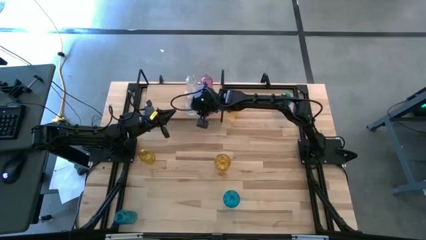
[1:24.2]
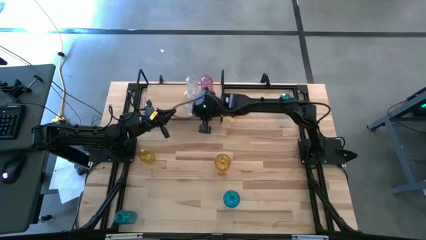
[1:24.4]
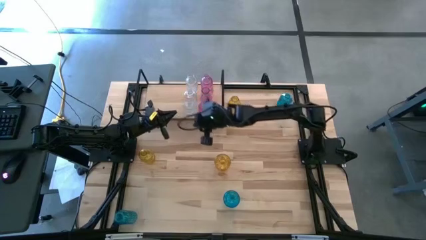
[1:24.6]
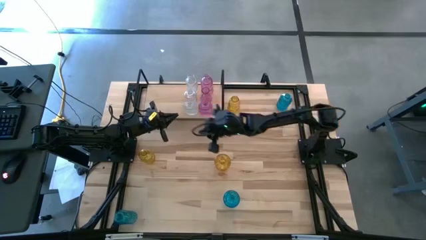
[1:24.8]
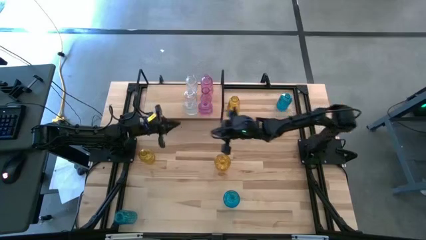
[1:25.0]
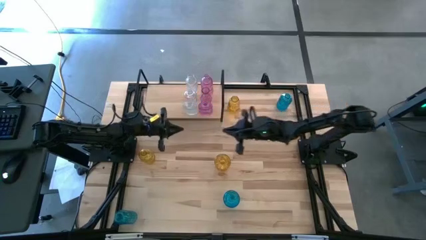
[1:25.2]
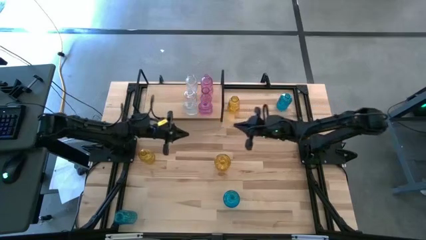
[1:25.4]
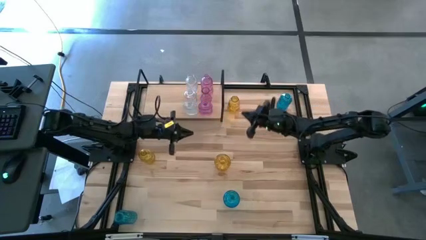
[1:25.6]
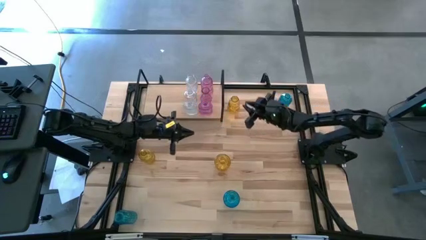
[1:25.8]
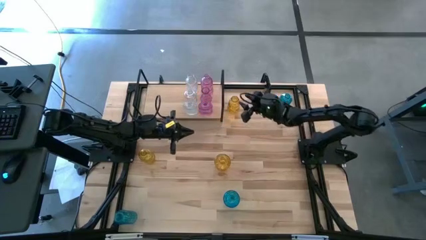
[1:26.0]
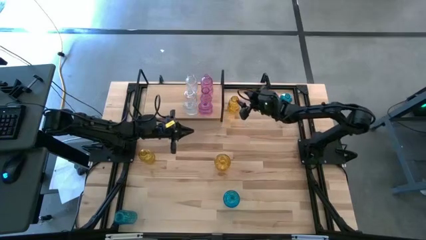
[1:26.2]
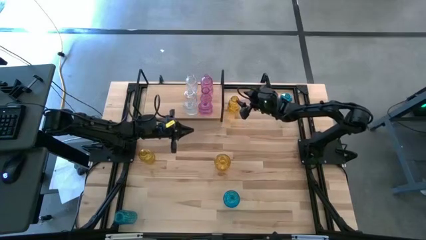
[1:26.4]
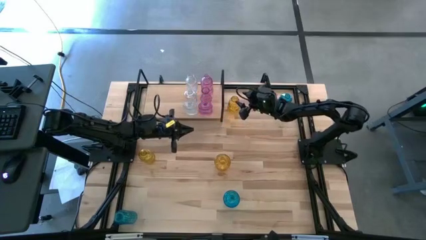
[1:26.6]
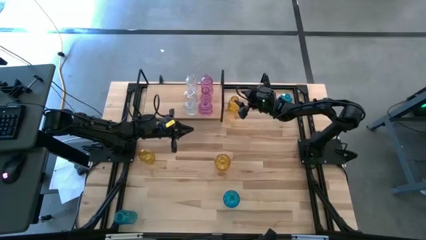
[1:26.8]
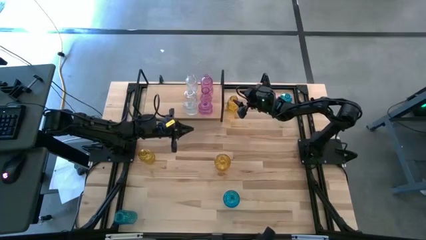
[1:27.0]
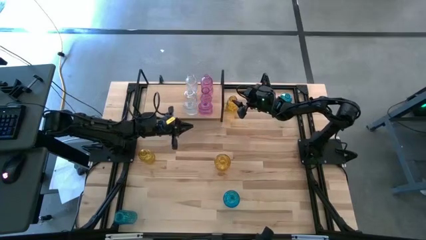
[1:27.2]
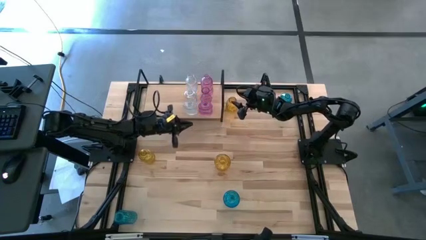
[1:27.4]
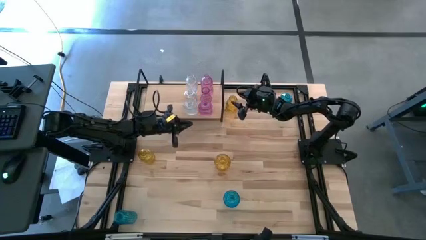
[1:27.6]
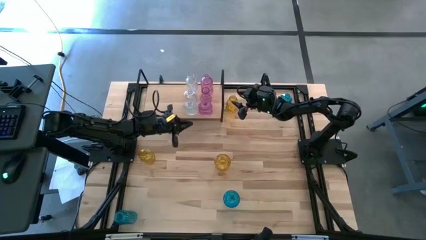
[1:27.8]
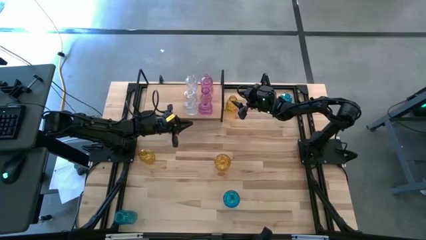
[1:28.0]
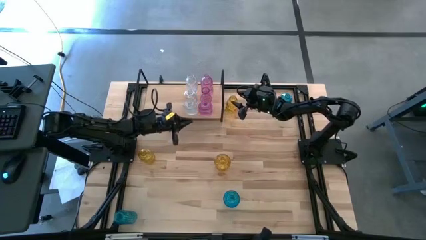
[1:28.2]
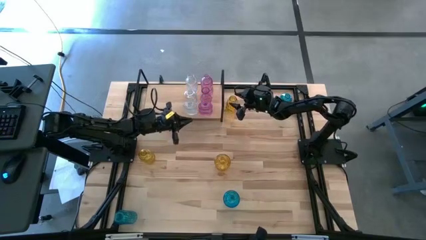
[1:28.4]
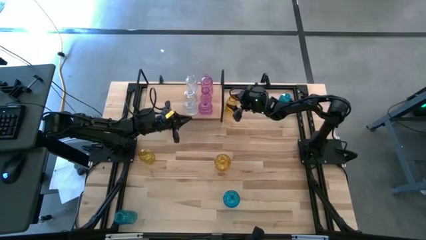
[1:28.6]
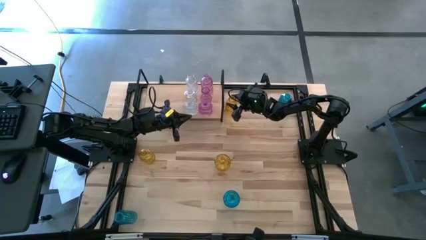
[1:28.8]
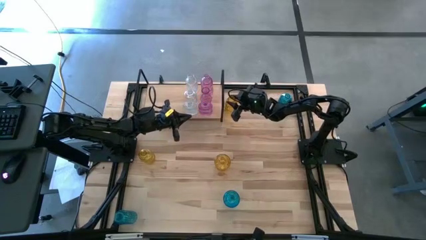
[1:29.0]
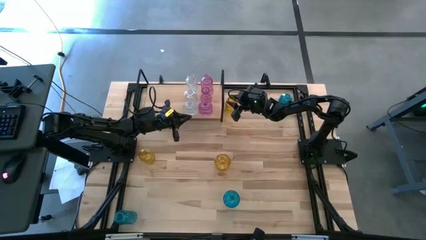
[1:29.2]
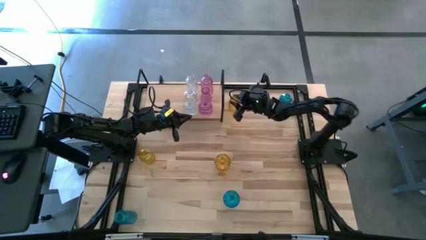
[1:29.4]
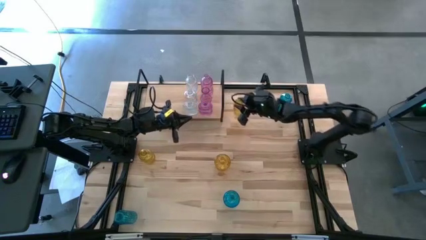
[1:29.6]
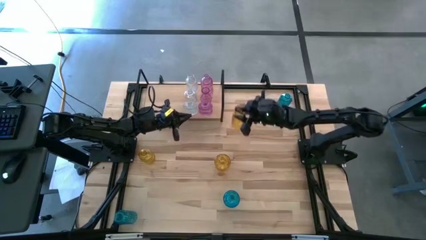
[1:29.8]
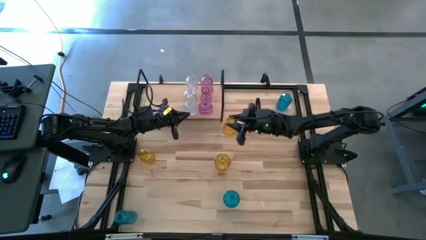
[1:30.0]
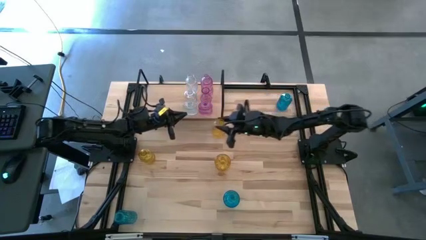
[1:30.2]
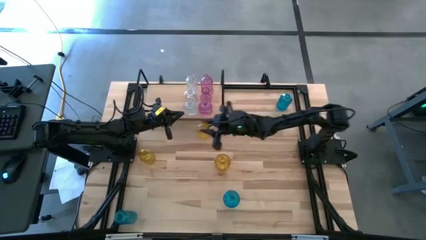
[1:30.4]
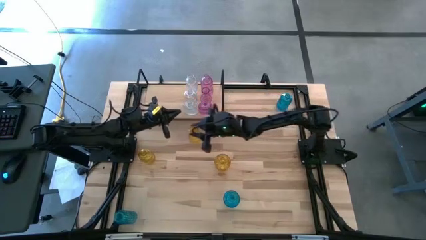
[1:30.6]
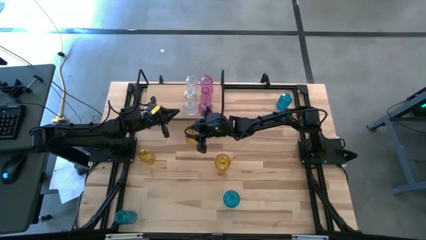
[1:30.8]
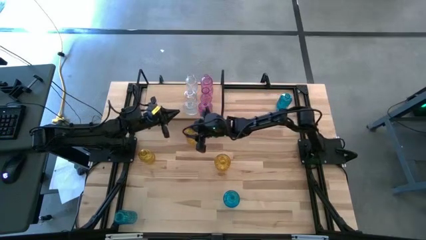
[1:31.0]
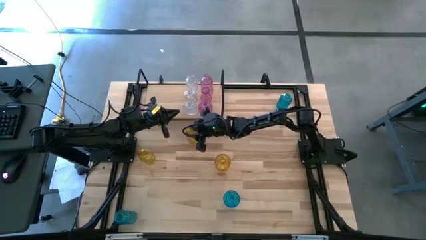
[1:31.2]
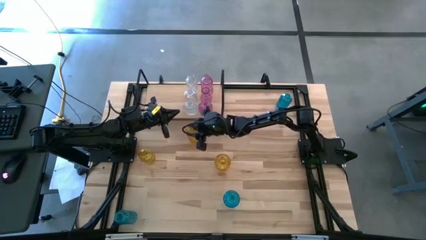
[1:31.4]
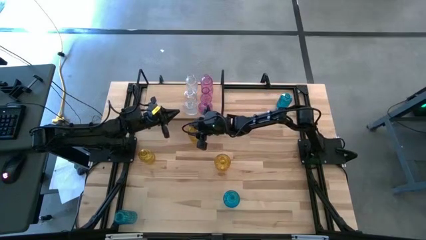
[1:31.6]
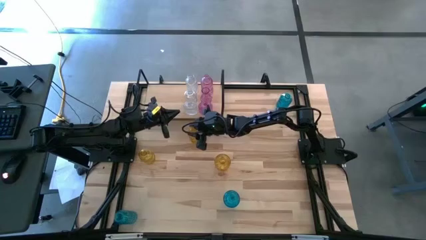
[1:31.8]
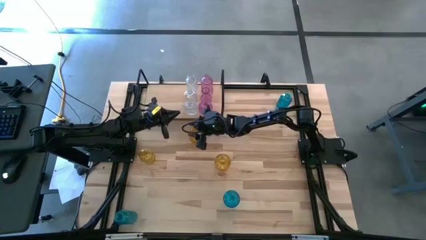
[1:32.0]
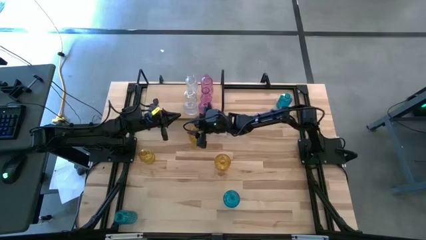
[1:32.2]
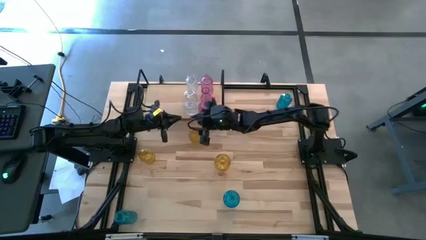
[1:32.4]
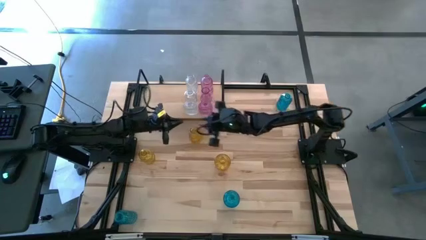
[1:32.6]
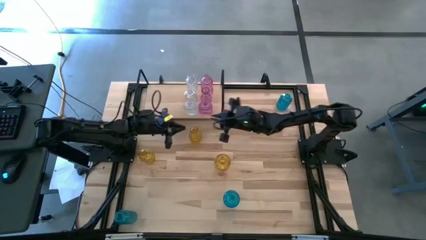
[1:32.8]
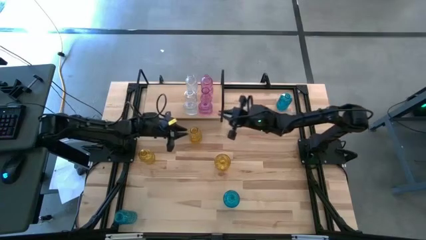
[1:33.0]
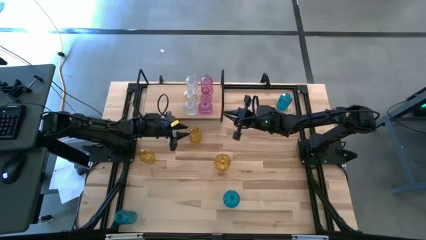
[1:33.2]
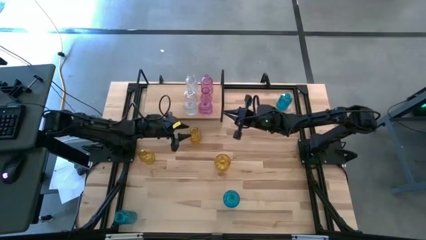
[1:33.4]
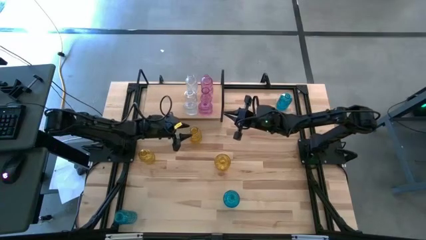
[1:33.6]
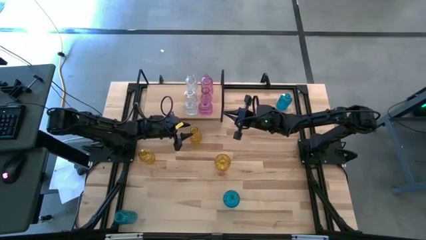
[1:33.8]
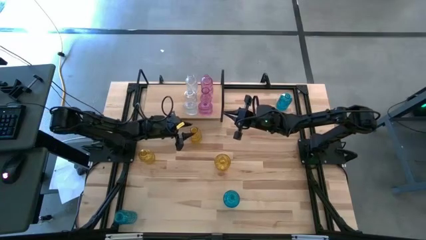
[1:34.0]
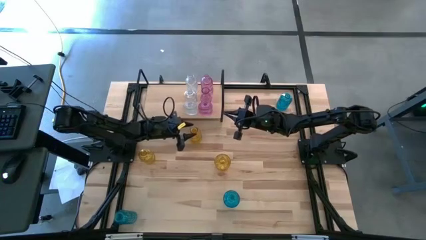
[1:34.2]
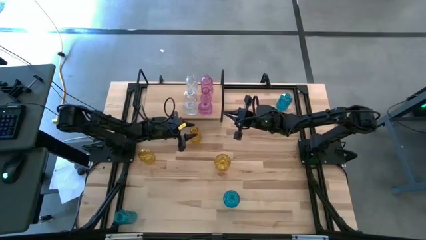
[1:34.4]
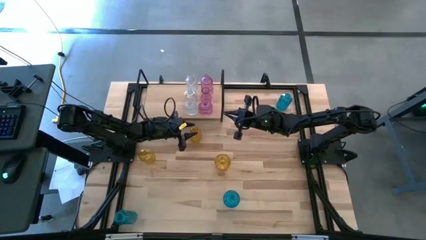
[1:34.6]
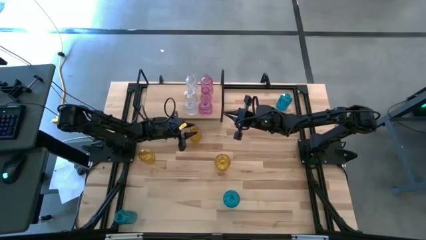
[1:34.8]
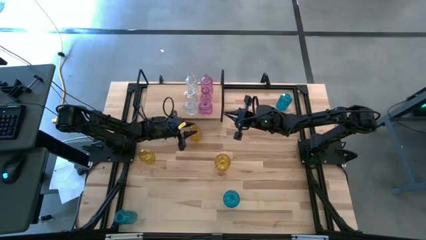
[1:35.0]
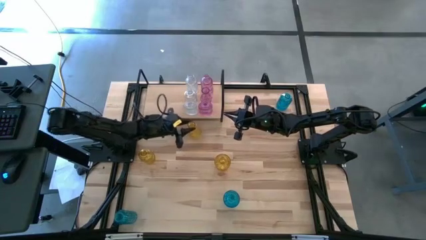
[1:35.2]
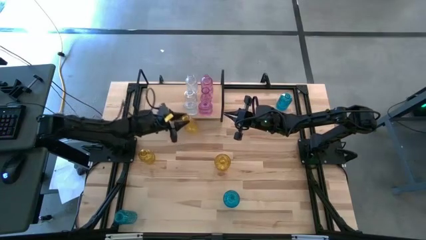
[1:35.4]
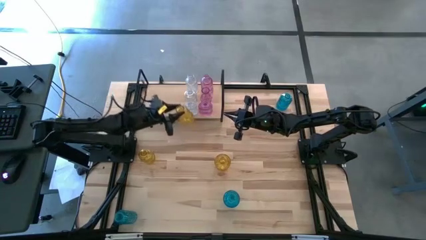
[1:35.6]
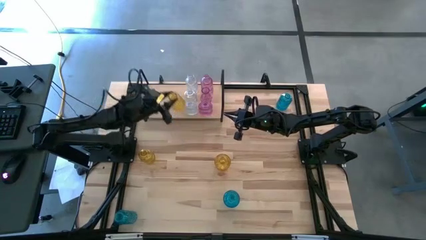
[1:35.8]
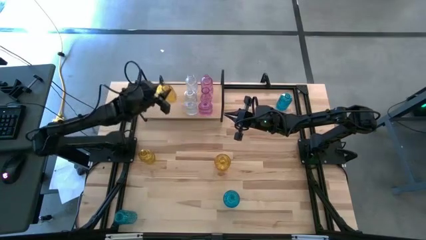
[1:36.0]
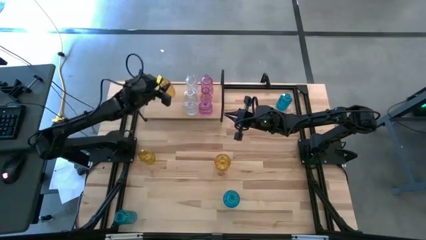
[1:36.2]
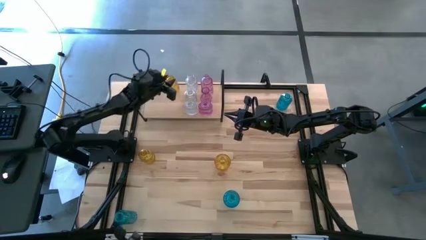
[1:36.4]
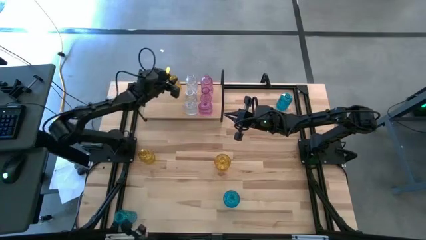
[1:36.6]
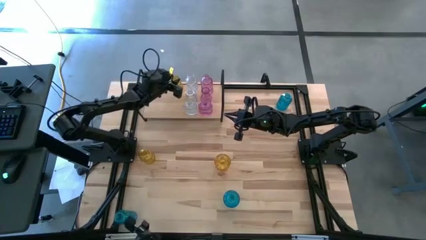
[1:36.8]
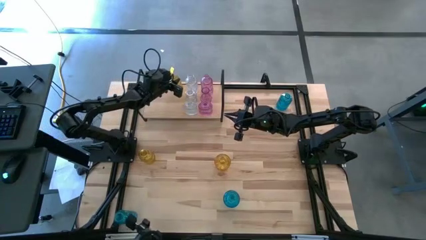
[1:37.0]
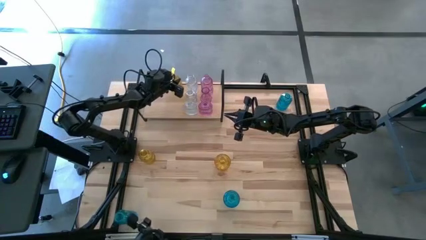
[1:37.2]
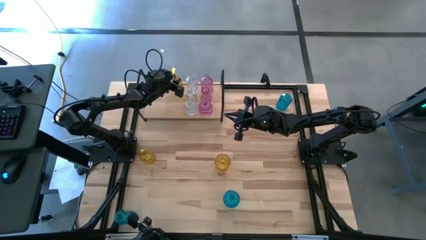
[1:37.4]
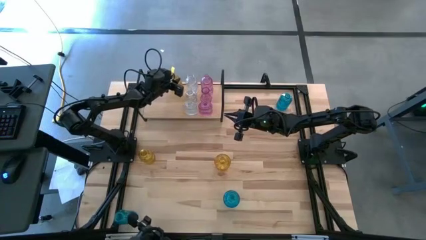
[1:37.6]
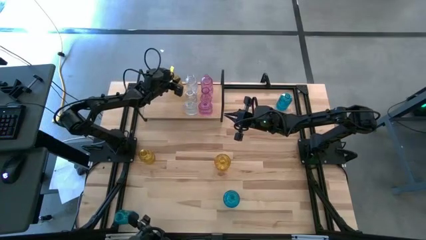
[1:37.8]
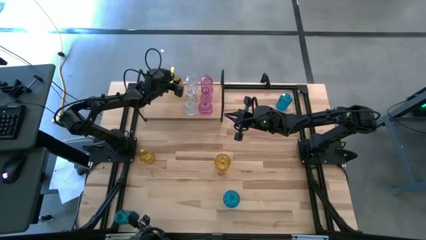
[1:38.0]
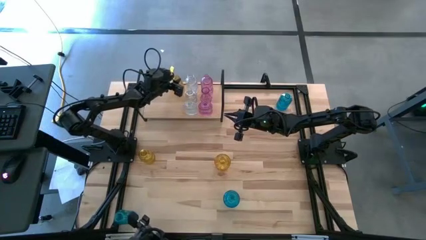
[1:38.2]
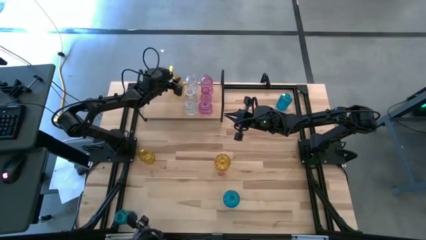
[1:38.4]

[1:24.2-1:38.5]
Task: sort vases onto shelf
Put the top yellow vase on the shelf

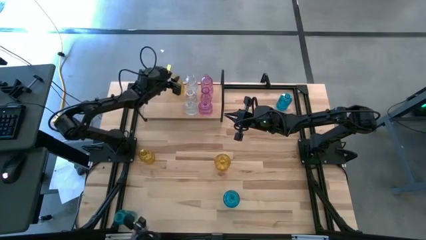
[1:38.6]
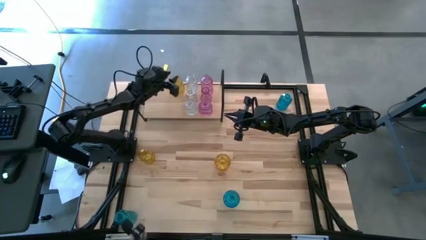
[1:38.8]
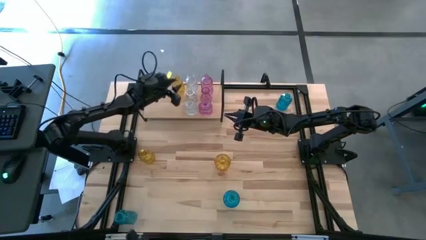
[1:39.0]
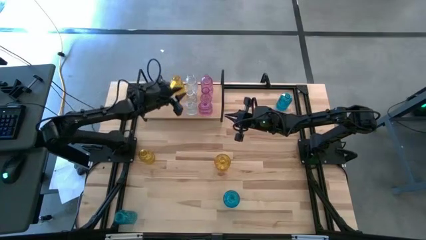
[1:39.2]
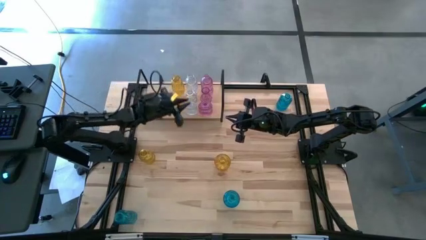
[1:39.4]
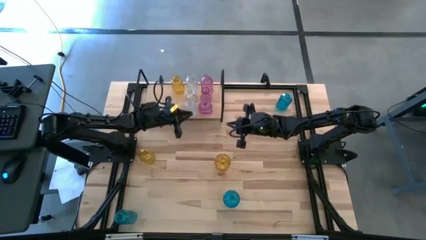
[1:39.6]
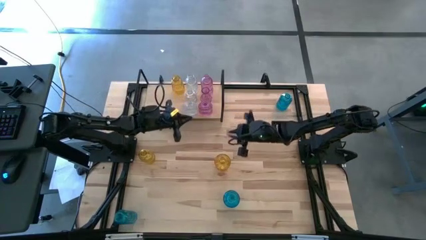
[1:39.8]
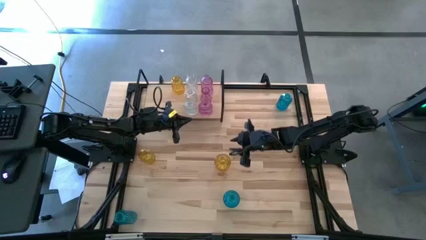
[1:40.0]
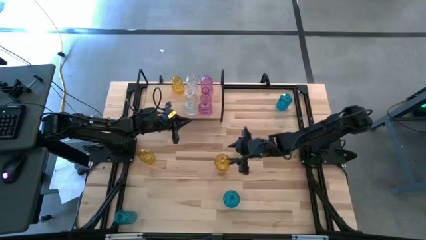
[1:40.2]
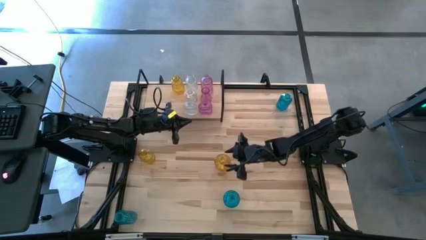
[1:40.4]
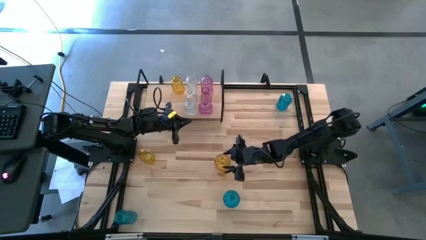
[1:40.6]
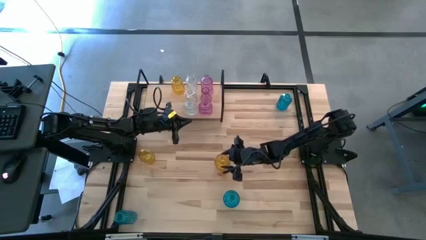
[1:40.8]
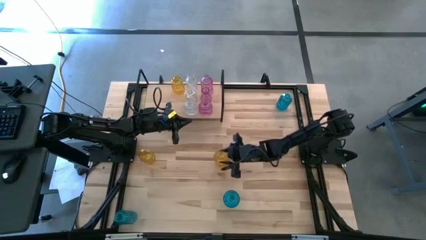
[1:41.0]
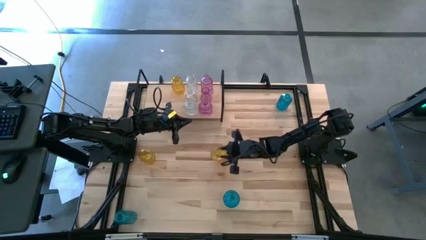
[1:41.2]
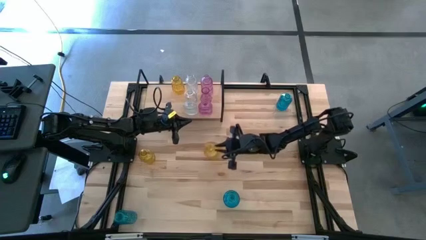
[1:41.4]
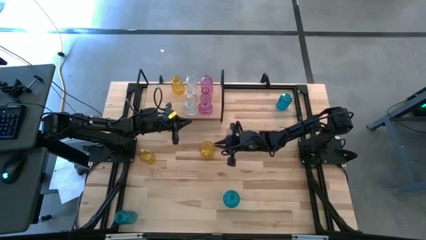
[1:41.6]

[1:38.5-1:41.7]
Put the right yellow vase on the shelf
